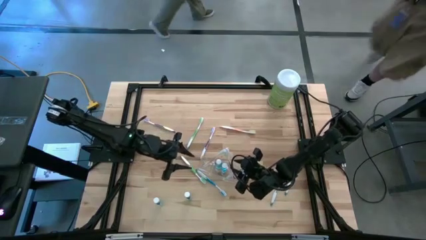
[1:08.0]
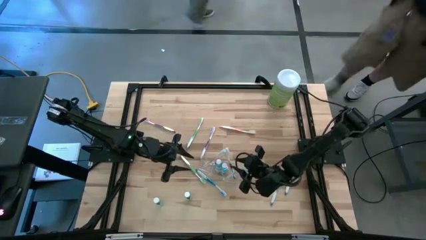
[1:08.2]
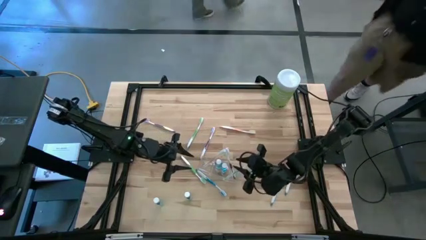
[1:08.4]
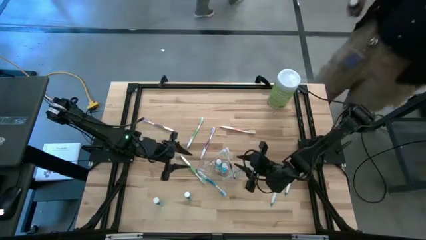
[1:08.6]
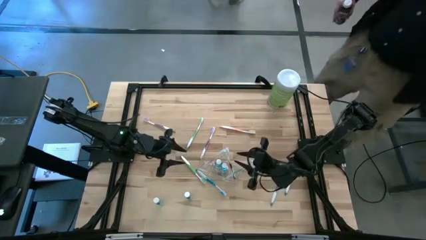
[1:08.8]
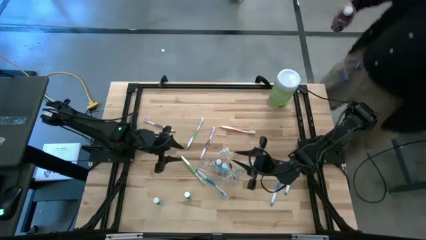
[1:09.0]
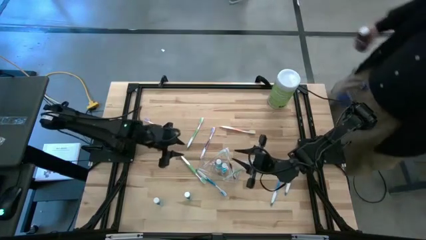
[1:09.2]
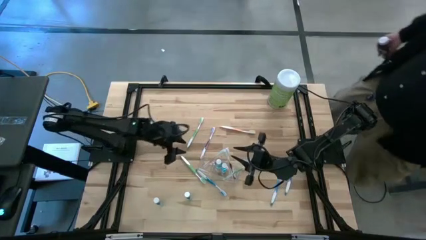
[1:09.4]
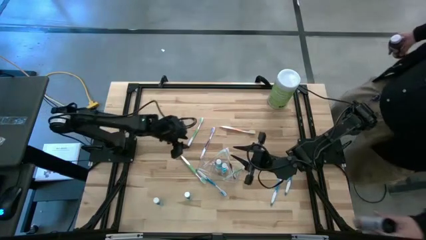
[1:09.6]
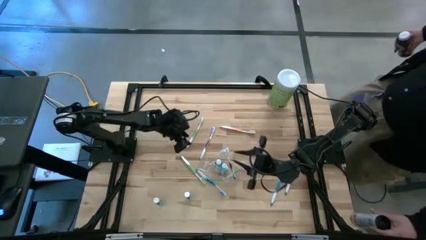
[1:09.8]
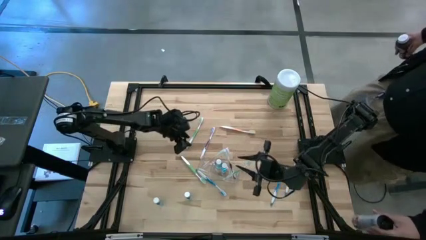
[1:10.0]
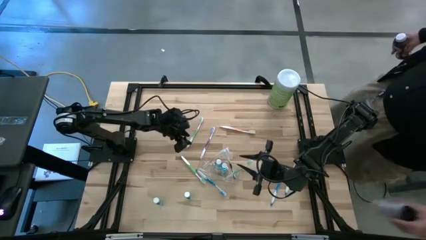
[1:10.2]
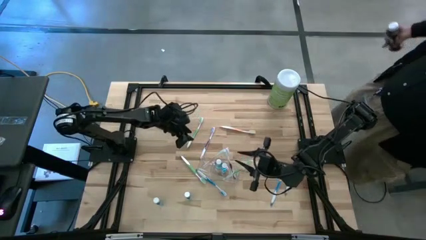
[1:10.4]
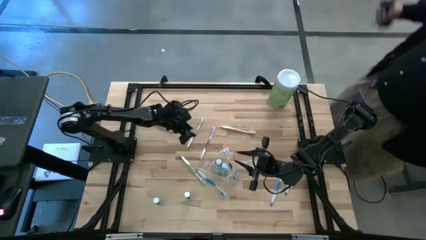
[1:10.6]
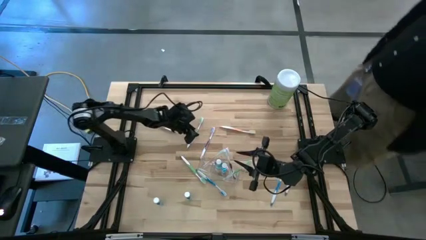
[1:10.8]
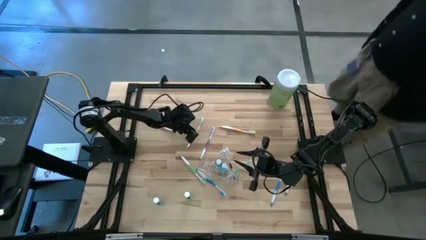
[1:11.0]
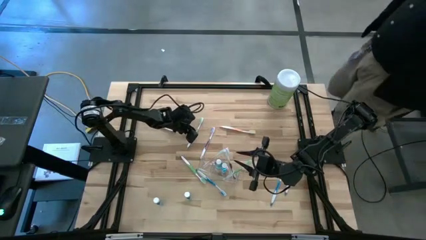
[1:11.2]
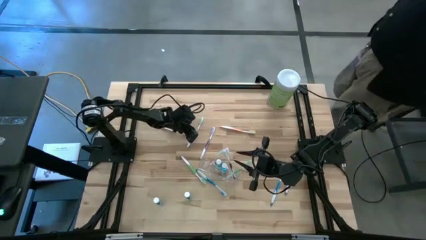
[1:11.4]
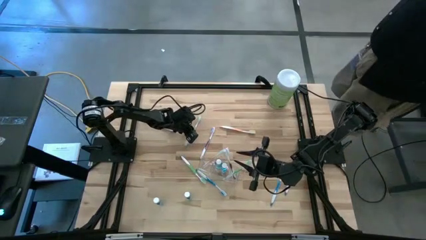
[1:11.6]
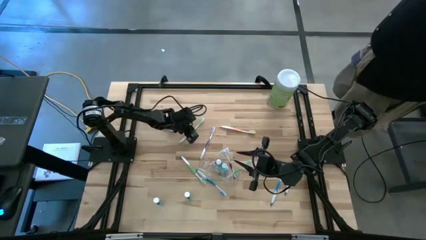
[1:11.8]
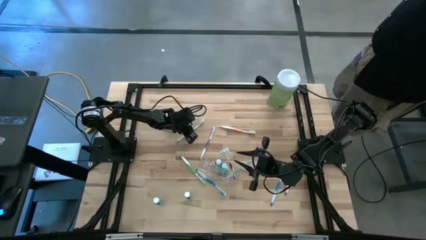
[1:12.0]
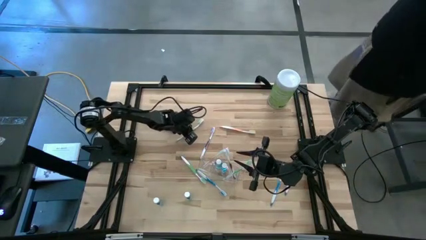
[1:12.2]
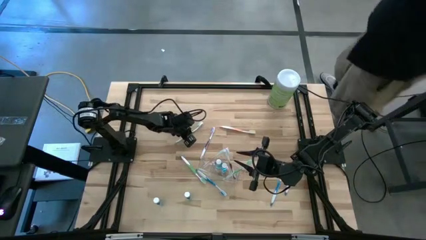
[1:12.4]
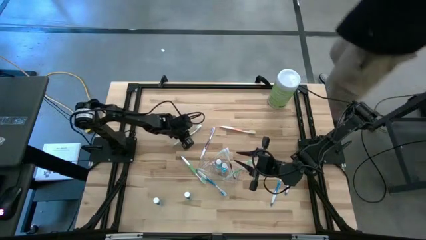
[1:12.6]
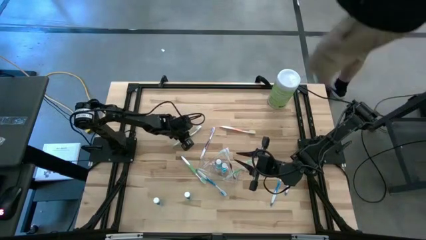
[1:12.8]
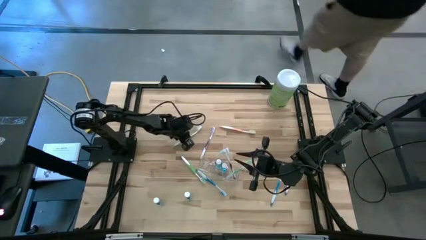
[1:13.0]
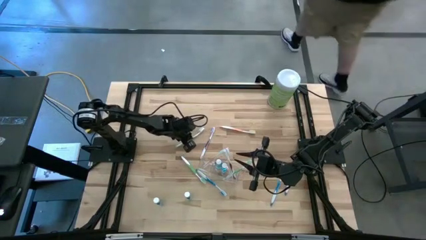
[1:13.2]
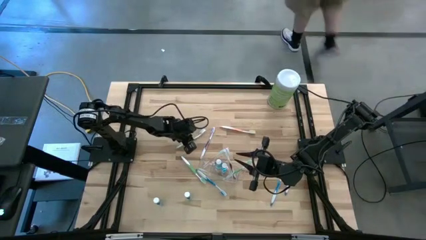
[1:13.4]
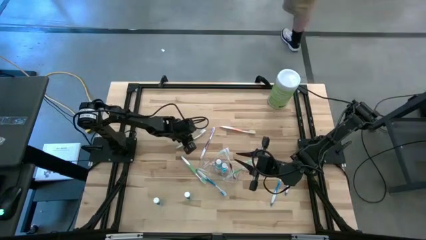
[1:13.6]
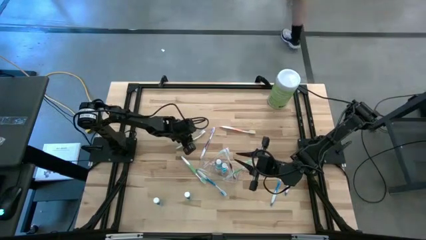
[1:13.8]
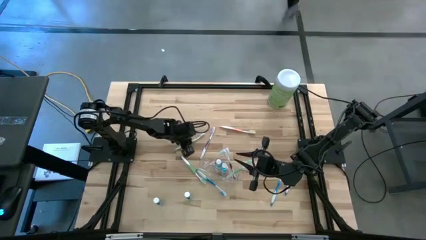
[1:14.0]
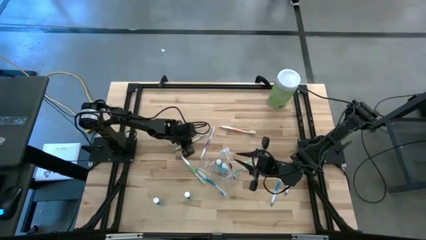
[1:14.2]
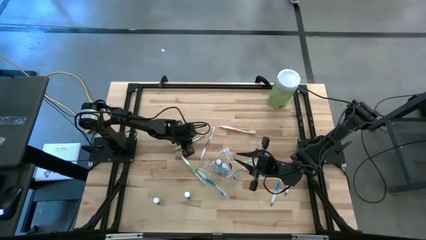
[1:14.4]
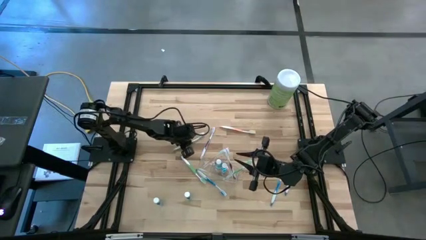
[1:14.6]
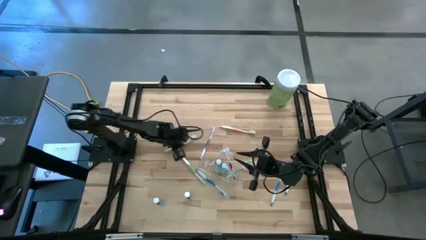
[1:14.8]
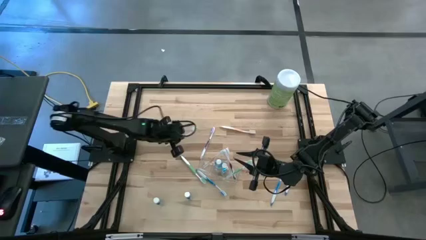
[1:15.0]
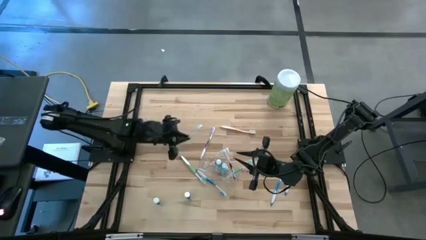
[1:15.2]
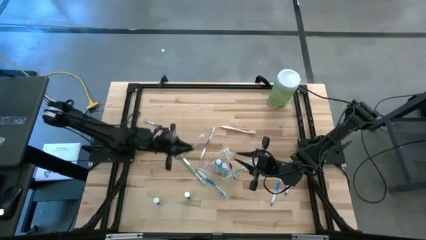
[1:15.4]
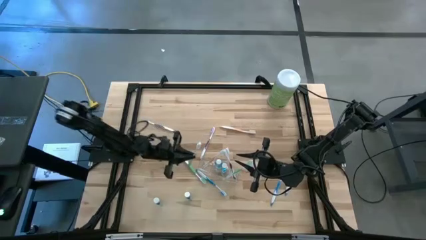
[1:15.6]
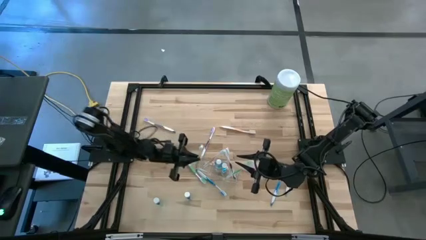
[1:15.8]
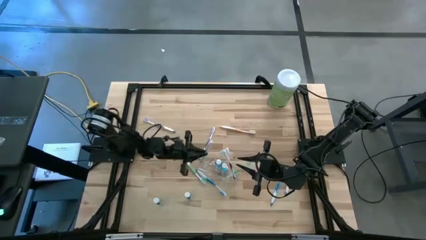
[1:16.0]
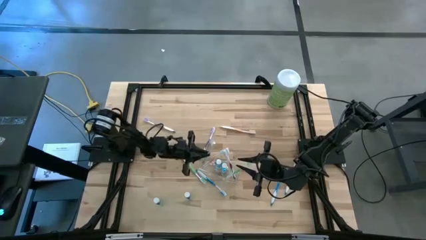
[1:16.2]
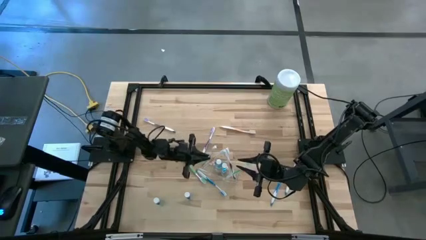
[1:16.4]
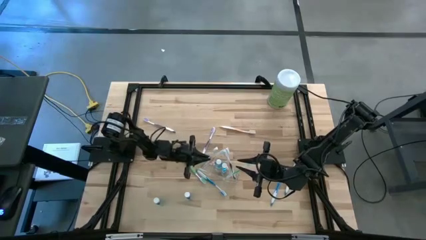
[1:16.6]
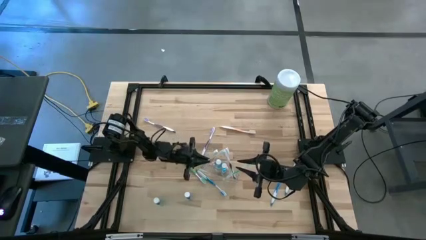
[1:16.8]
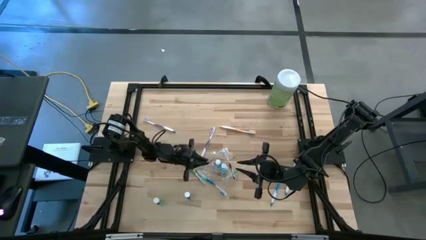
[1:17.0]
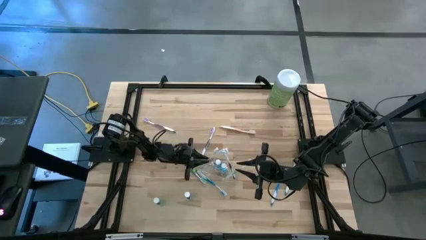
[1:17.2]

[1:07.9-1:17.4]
Task: Pick & Place toothbrushing station
Put the green toothbrush into the transparent organizer

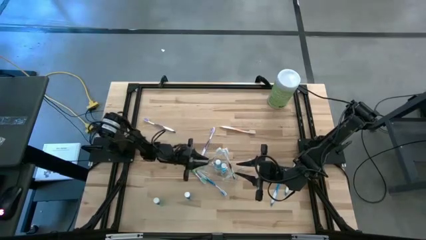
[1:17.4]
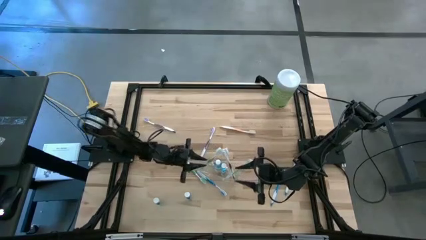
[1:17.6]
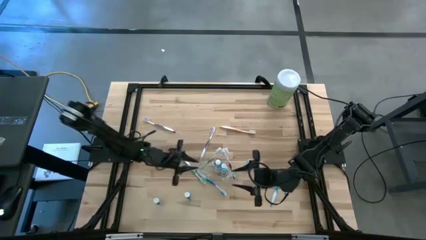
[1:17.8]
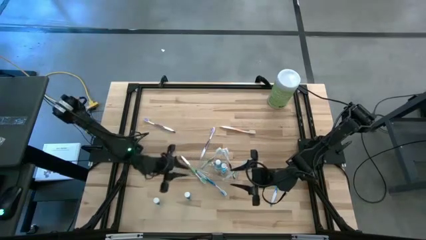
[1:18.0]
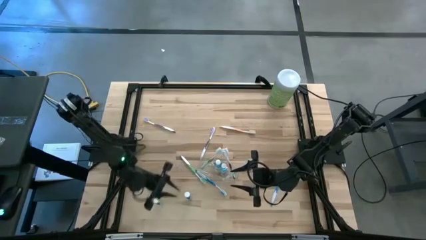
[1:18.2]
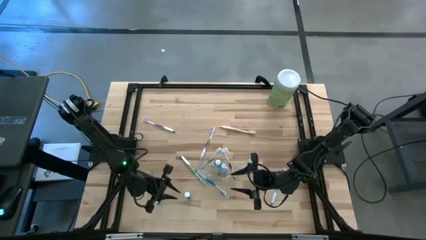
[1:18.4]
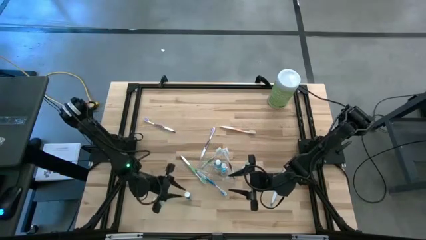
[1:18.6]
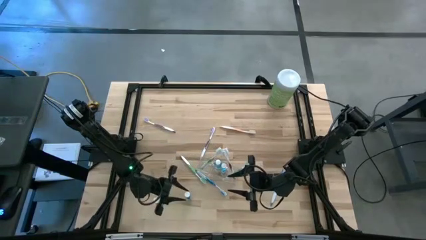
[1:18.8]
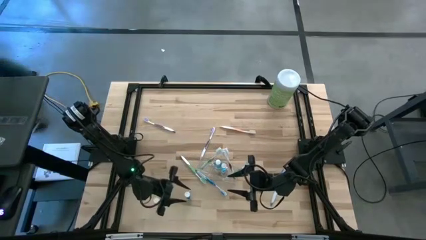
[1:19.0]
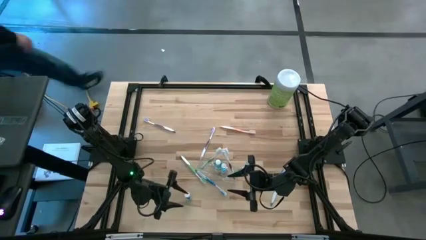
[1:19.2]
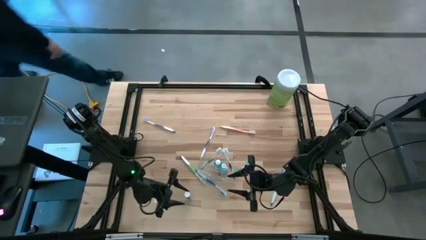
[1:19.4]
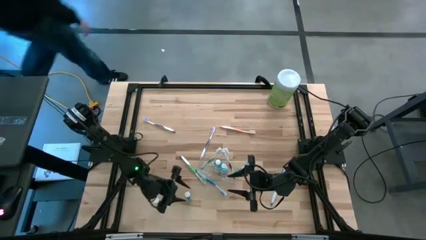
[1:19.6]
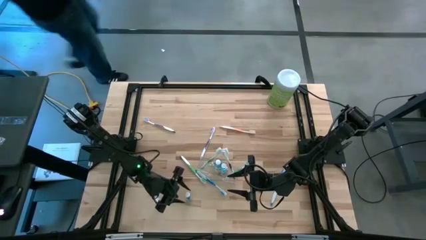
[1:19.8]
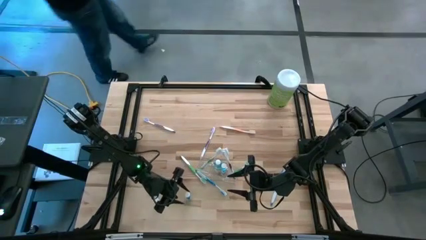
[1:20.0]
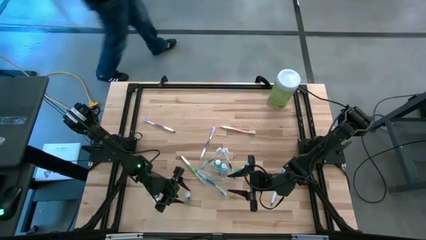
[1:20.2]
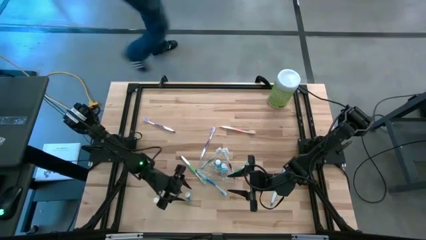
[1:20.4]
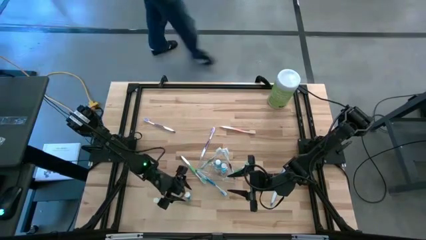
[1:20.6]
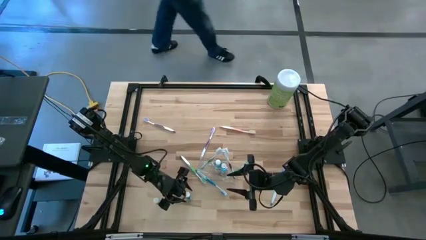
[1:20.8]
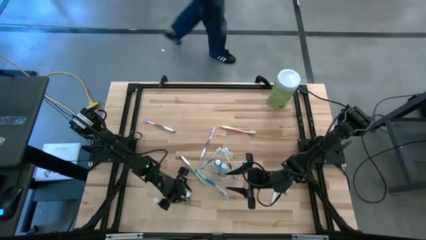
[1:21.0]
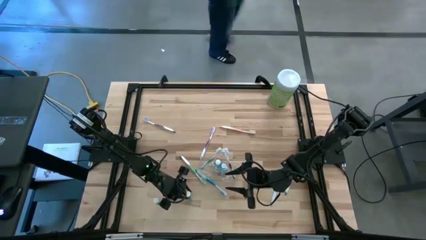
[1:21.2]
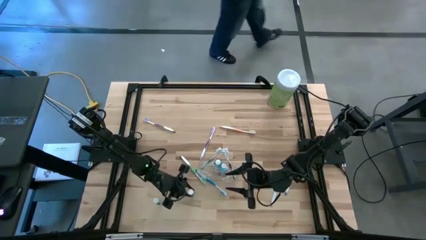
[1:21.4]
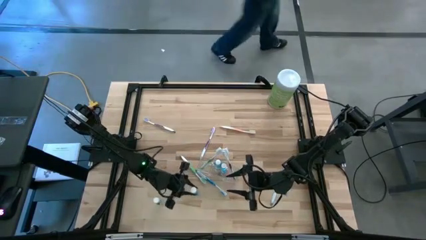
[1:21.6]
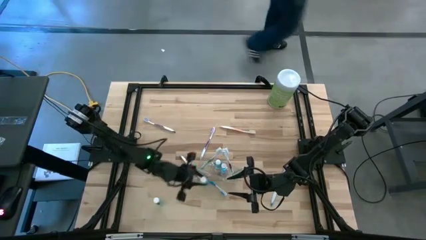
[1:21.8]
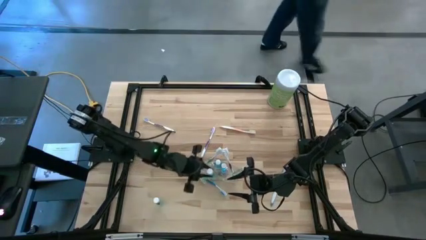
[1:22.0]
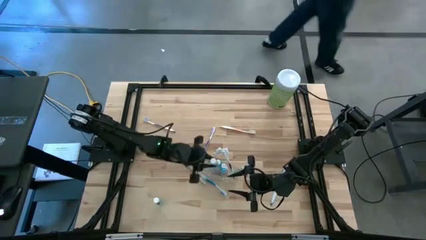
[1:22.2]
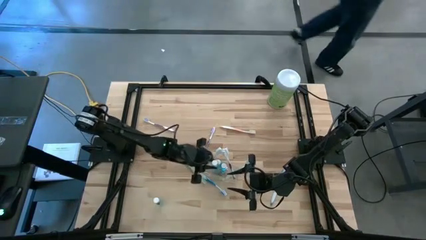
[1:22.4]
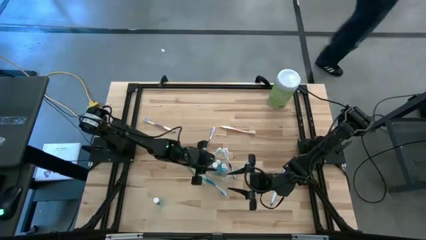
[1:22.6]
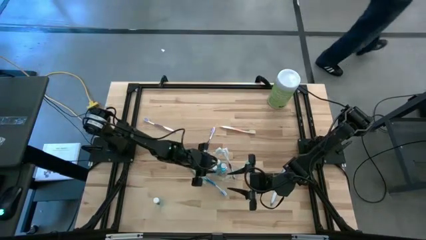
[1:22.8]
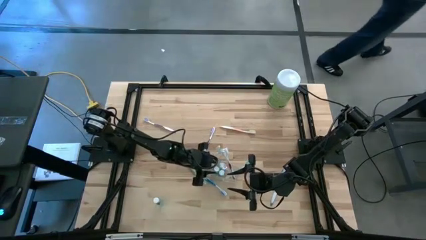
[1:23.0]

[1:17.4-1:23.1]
Put the blue mouthwash into the transparent organizer

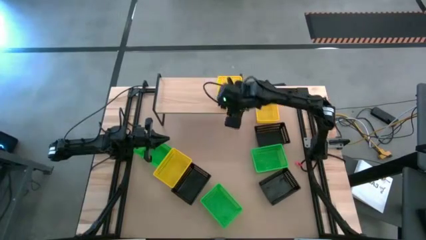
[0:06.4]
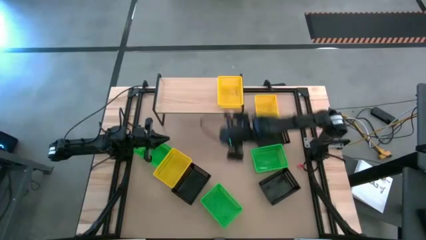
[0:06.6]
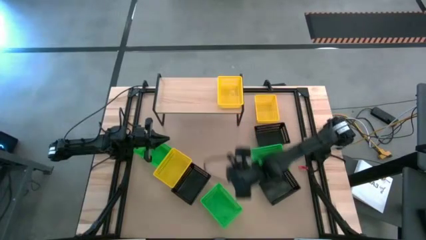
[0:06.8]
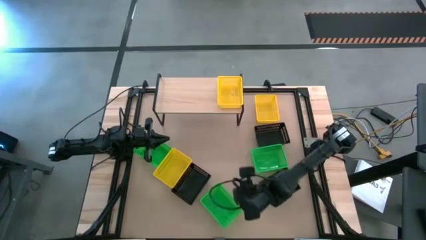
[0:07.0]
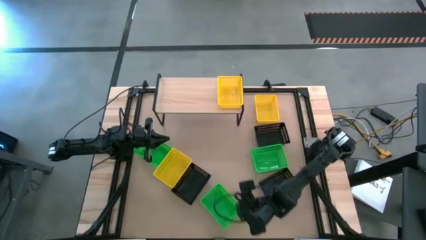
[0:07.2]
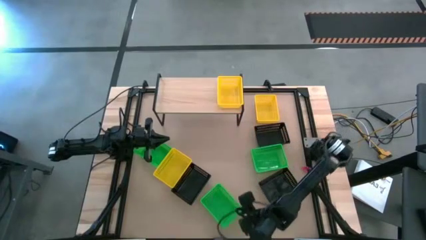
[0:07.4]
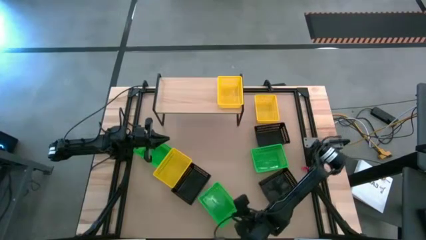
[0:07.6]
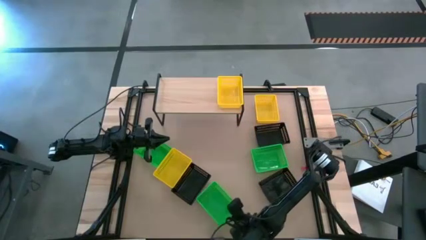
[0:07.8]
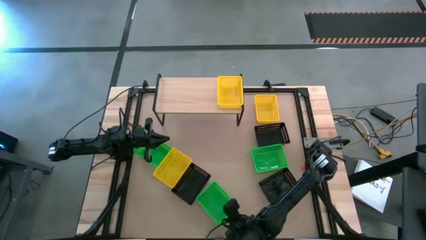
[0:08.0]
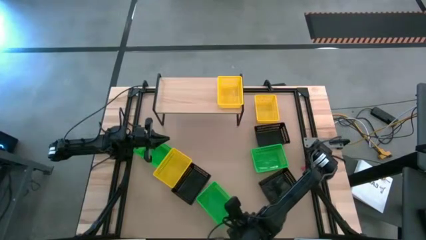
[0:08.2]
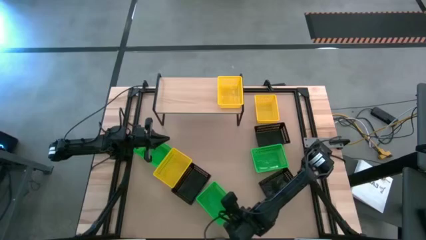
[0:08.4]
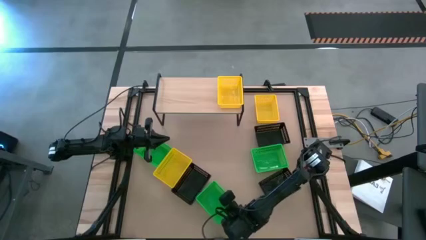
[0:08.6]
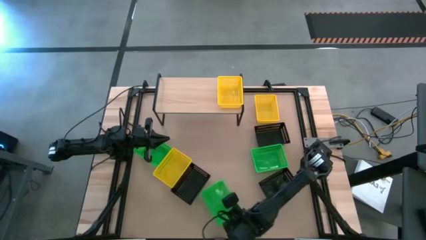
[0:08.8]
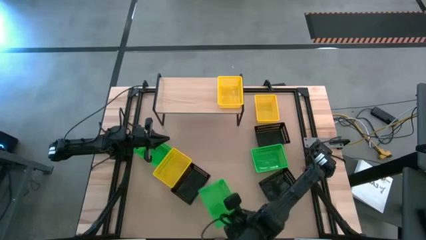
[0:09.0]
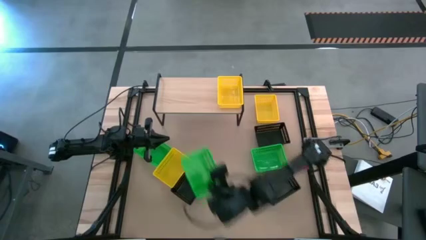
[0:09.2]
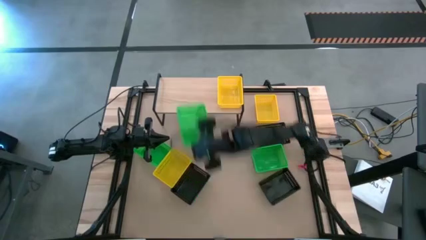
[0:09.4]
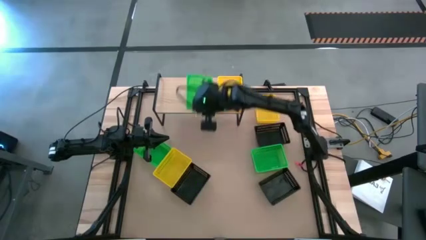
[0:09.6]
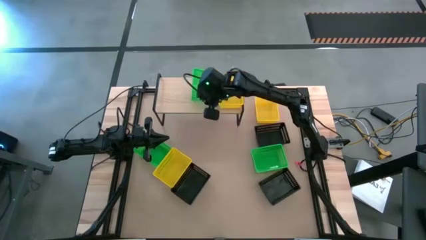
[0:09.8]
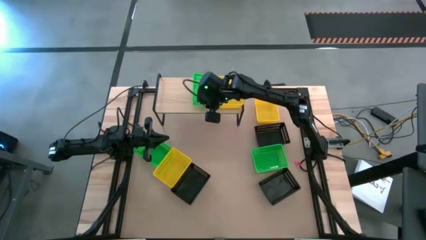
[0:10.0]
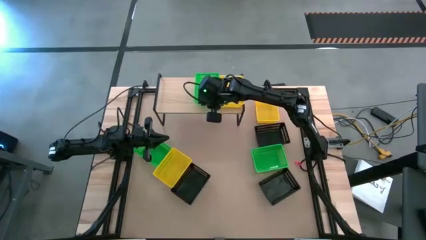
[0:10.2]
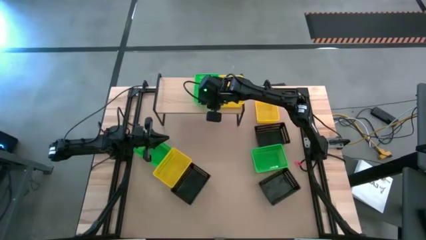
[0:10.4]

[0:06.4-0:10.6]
Task: Stack baskets on shelf by color
Put the bottom green bin on the shelf
